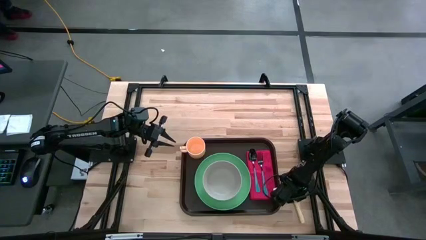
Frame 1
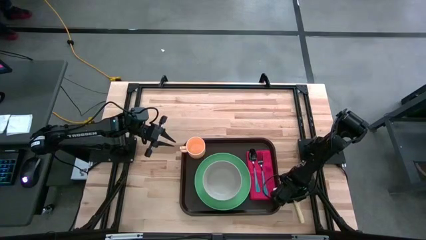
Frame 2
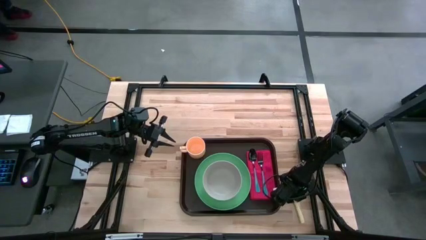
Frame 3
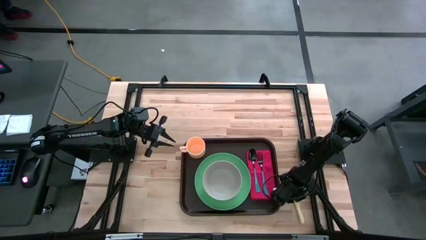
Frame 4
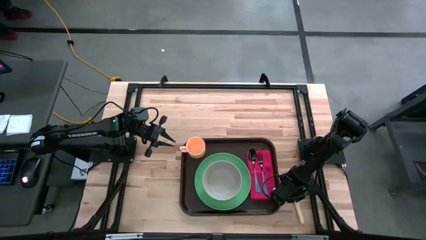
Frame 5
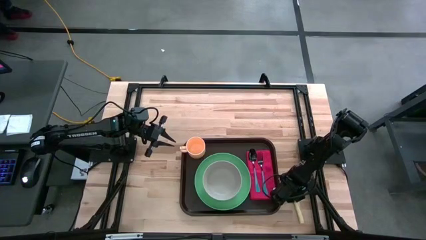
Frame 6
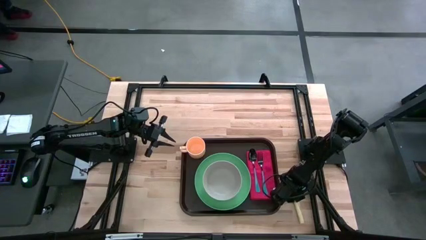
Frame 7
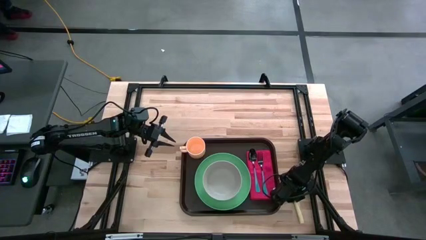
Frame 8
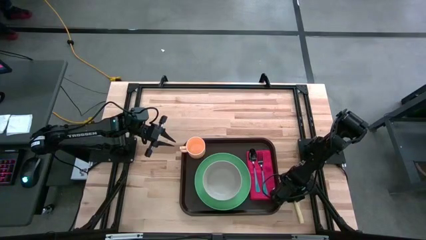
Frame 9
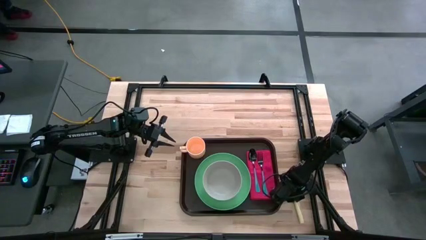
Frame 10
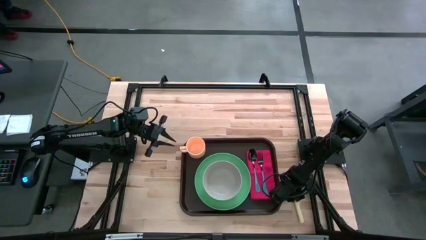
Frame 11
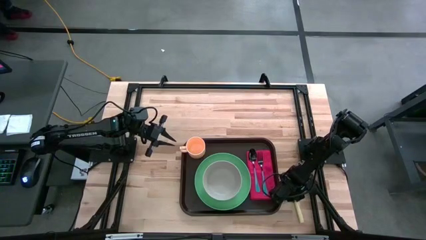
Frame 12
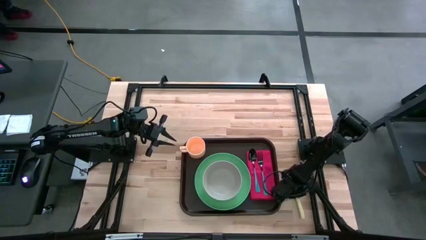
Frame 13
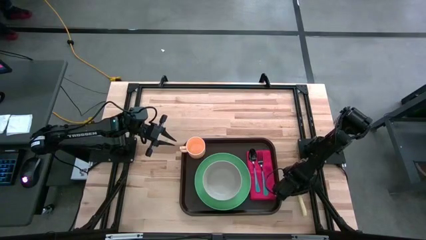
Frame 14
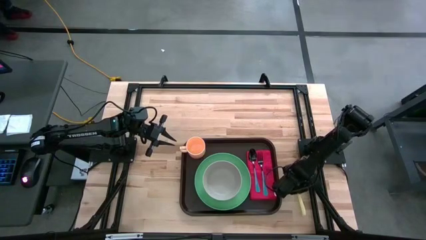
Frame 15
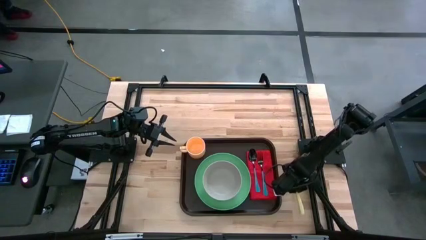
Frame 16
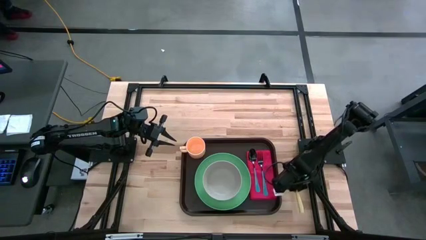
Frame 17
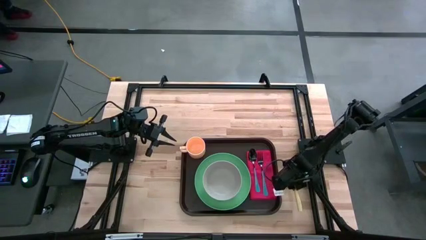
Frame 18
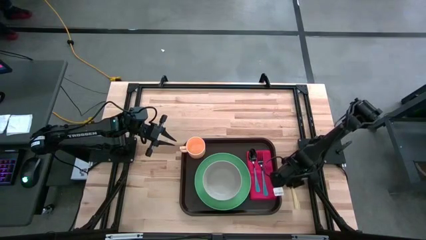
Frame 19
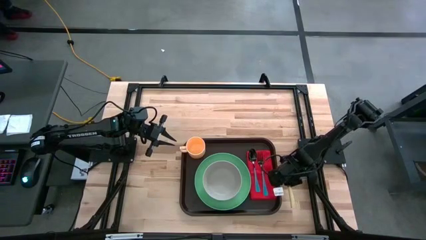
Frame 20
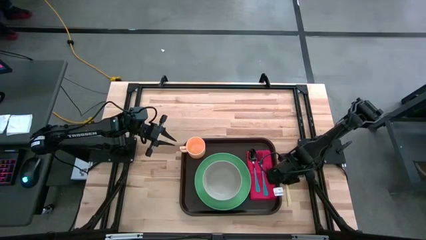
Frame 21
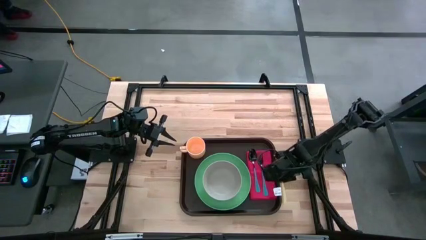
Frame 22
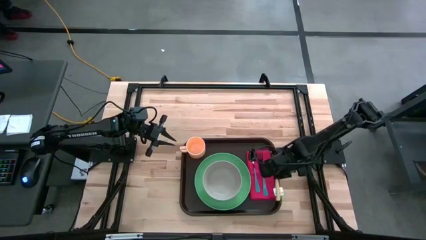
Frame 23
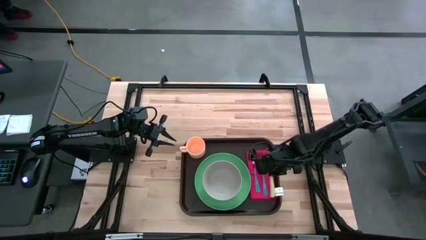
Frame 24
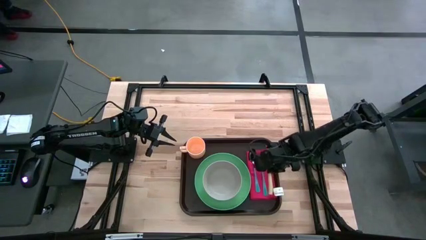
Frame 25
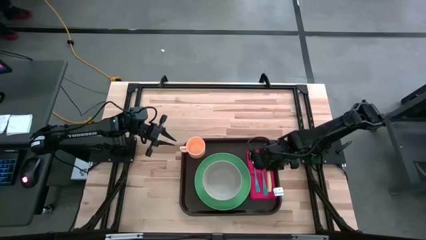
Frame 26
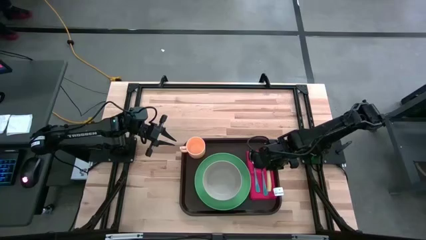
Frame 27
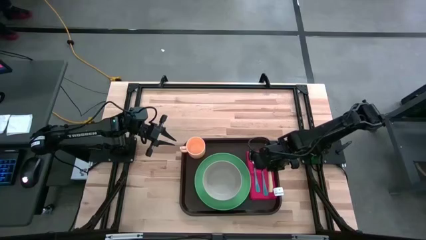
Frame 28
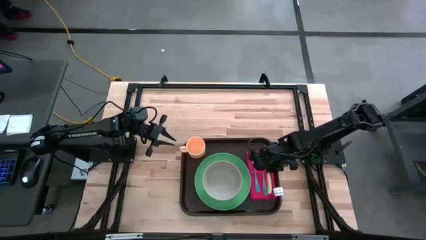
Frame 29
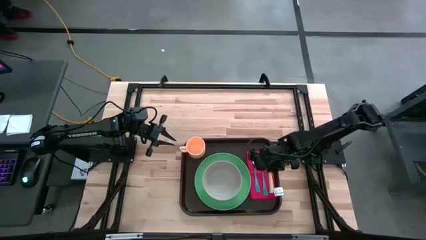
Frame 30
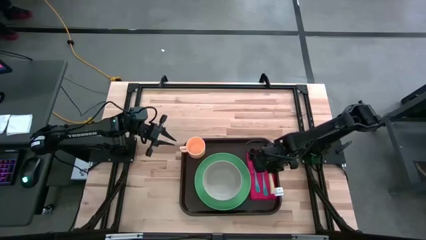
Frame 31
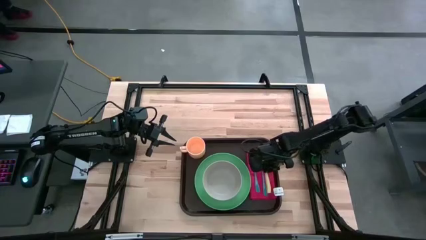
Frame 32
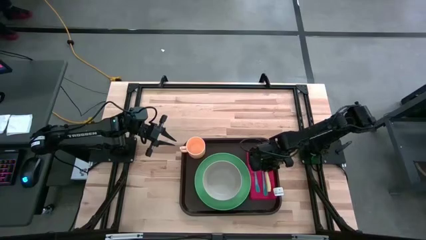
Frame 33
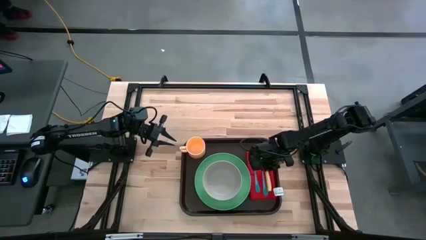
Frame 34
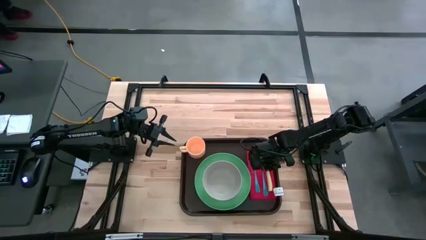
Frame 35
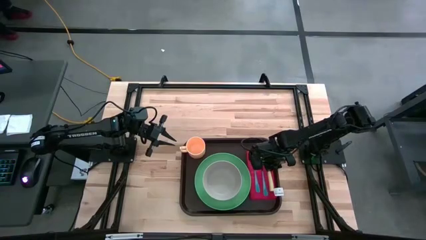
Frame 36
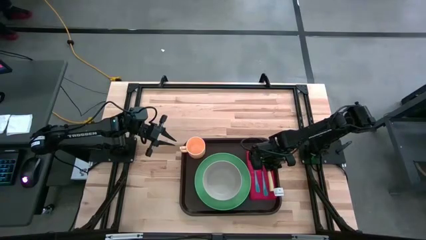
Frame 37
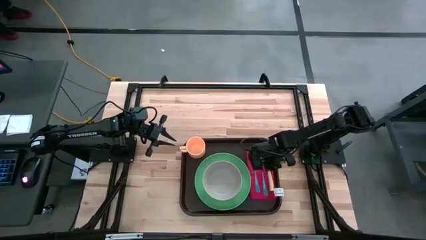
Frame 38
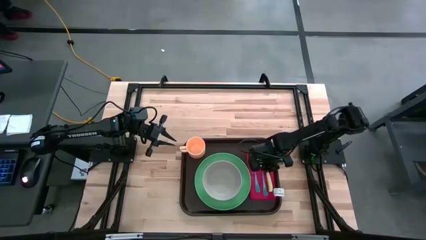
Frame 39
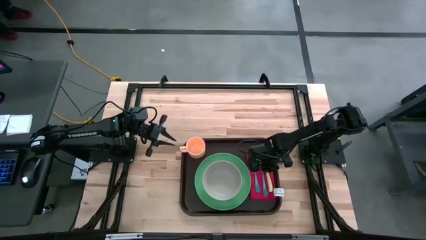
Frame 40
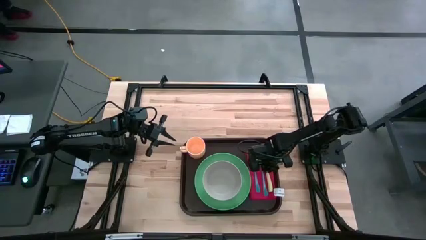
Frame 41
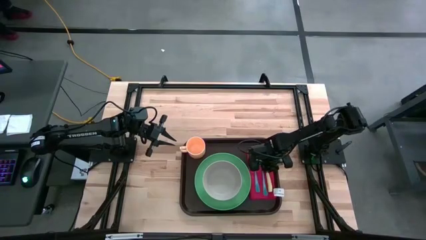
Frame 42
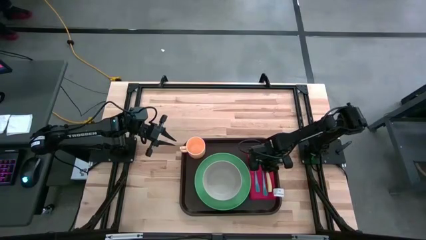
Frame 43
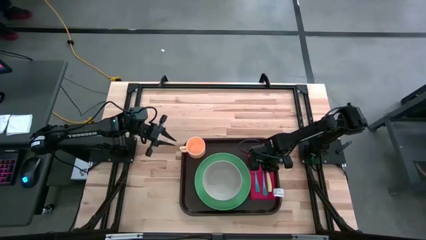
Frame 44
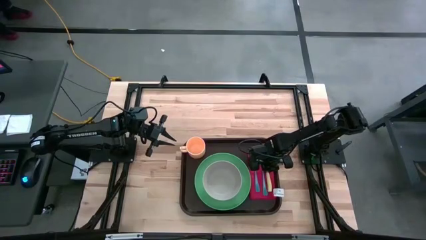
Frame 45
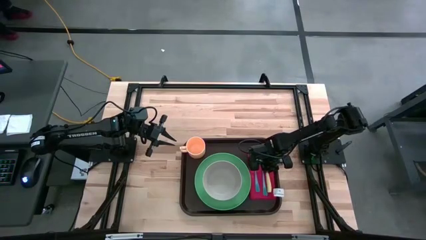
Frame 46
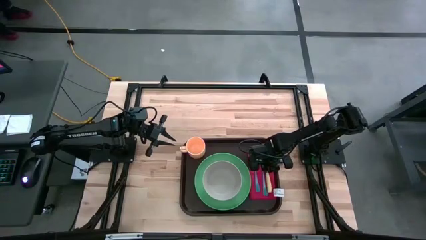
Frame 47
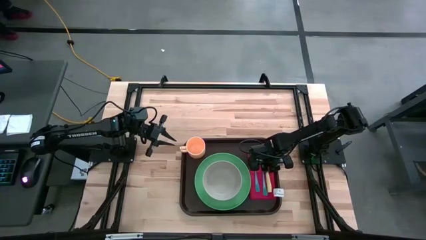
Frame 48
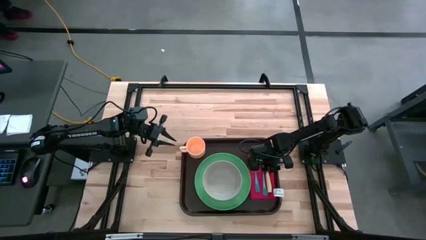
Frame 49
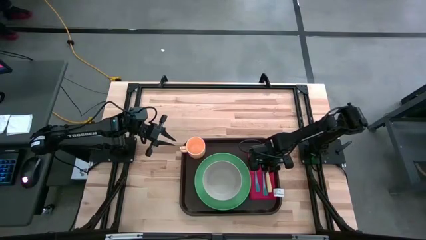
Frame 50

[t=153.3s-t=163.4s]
Task: Set up tray
Put the yellow table knife on the right of the blue fork on the brown serving tray

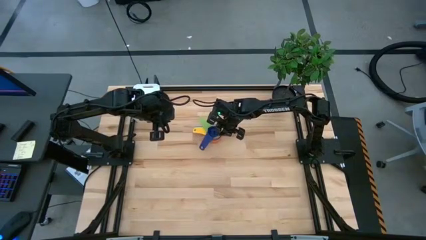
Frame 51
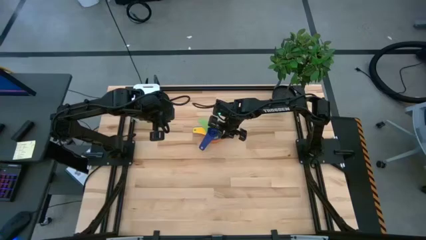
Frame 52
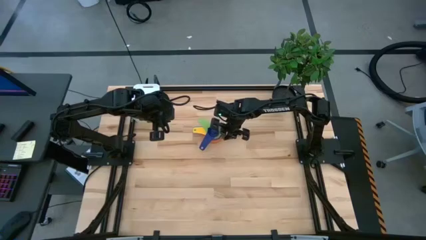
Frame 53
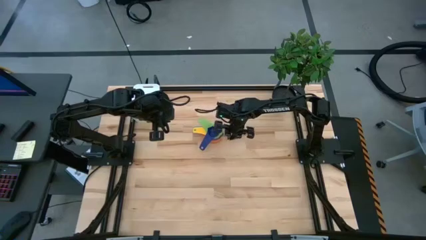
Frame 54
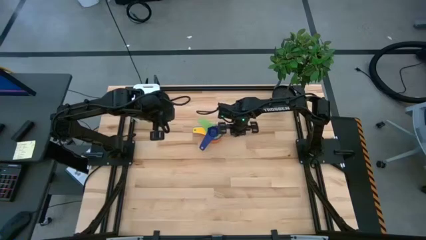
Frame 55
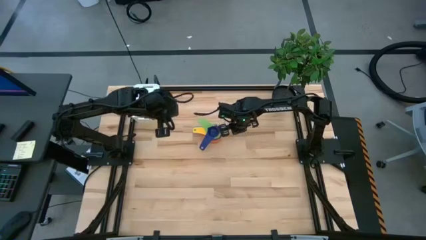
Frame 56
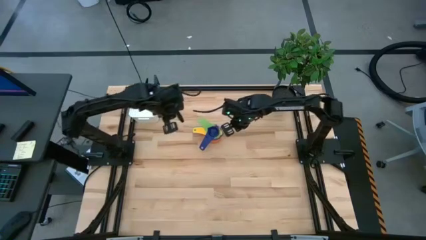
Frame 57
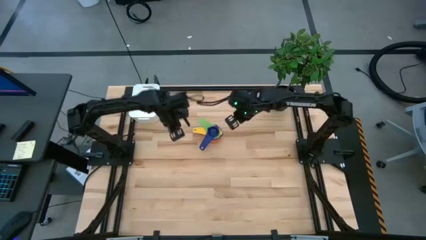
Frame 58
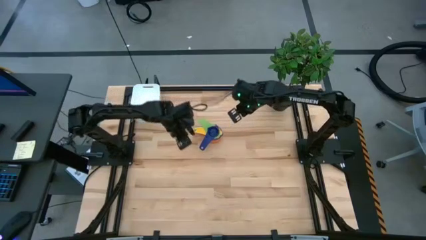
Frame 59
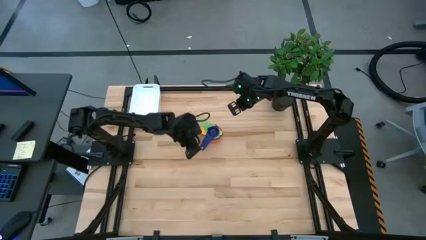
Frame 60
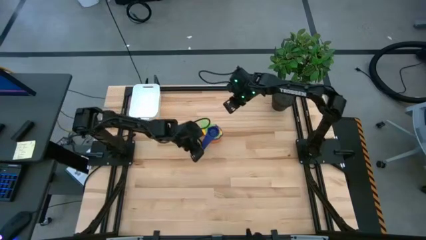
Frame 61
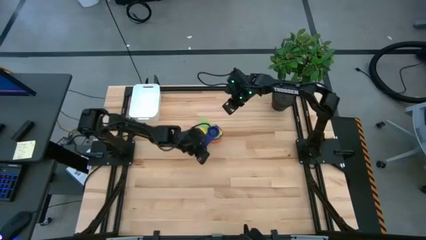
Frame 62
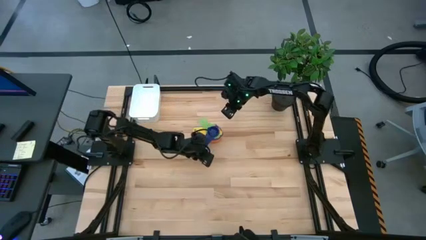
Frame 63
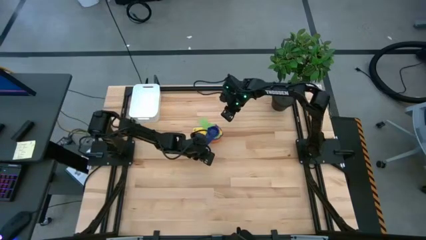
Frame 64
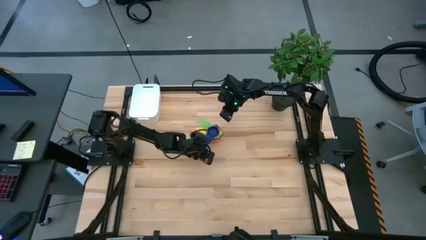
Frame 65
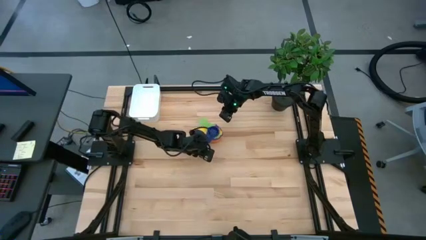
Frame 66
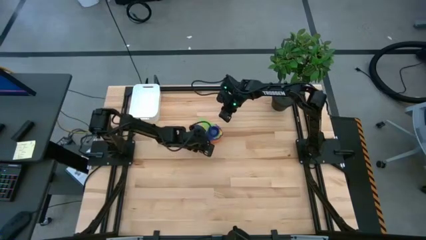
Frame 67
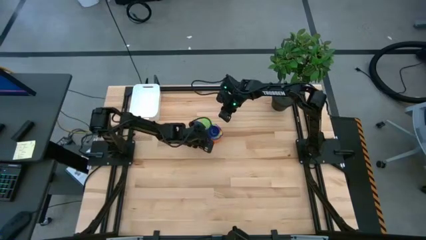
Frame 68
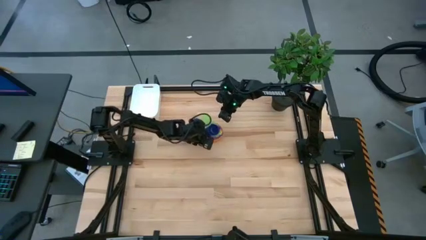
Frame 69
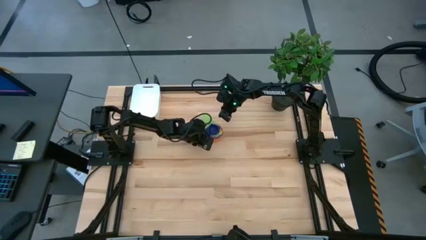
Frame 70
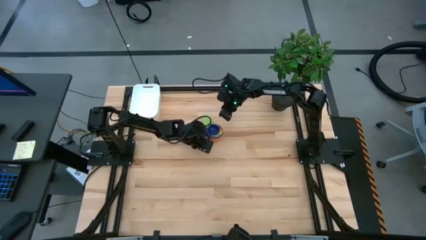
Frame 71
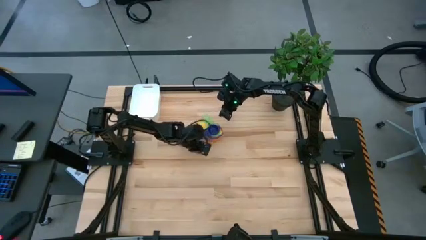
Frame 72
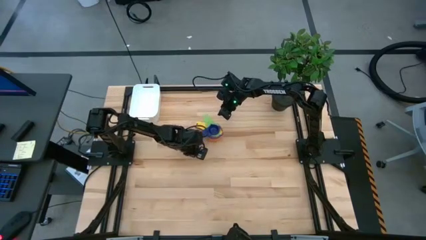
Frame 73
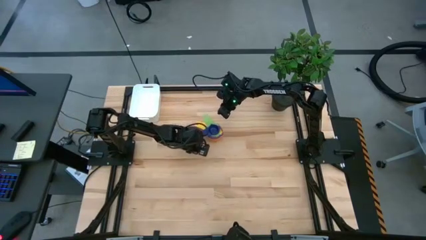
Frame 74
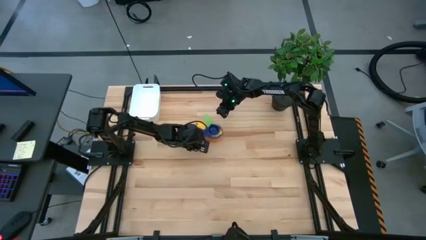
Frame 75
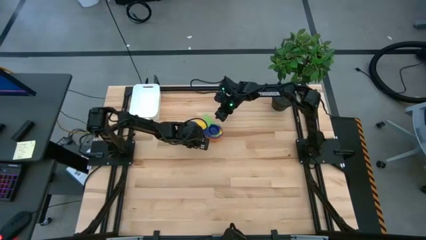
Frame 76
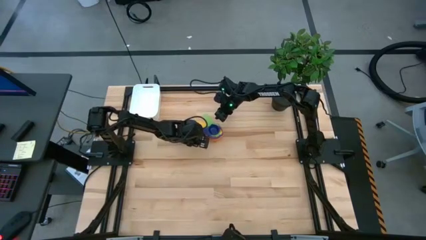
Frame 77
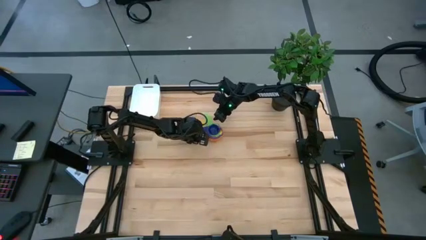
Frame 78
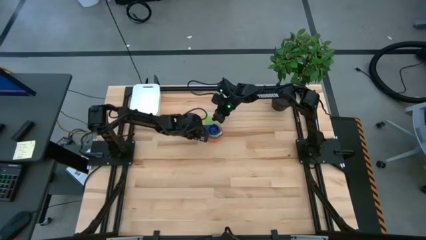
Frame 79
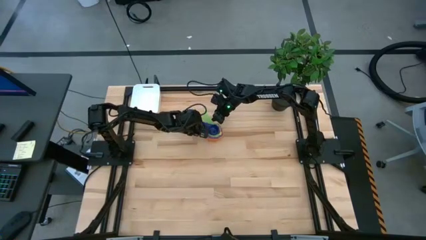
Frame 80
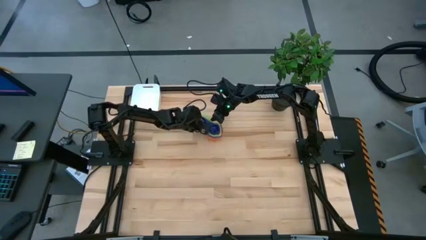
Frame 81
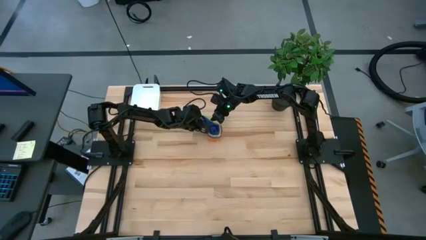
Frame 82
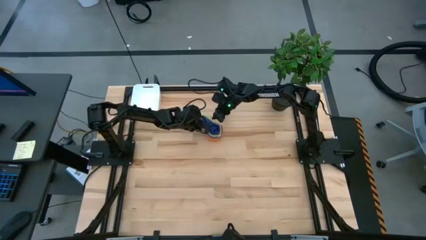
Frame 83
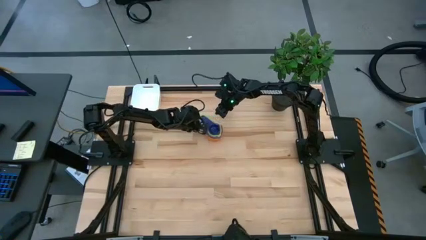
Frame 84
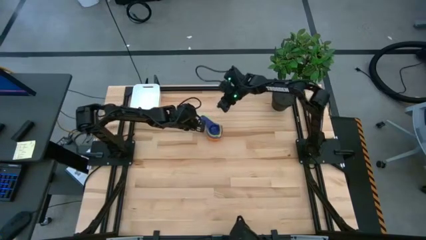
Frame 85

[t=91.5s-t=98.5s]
Task: Nest measuring cups in basket
Adjust the measuring cups
